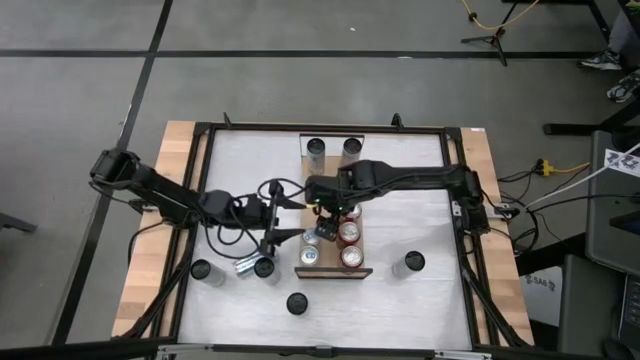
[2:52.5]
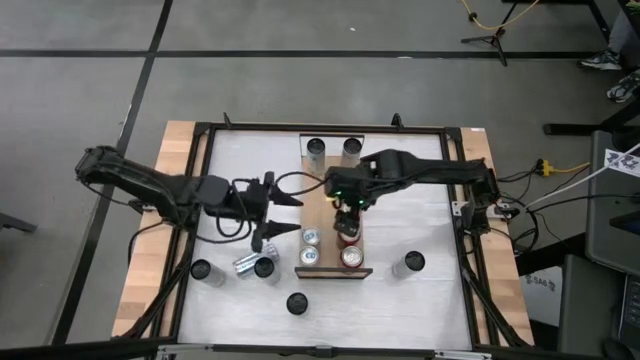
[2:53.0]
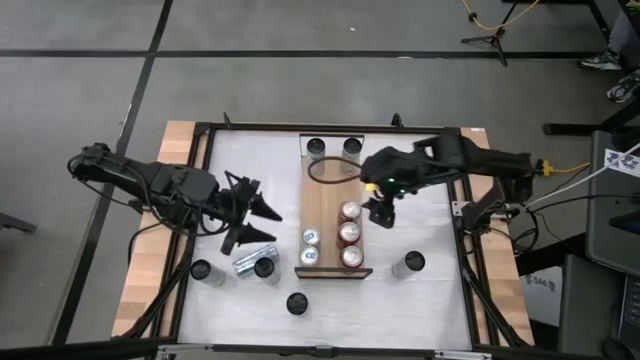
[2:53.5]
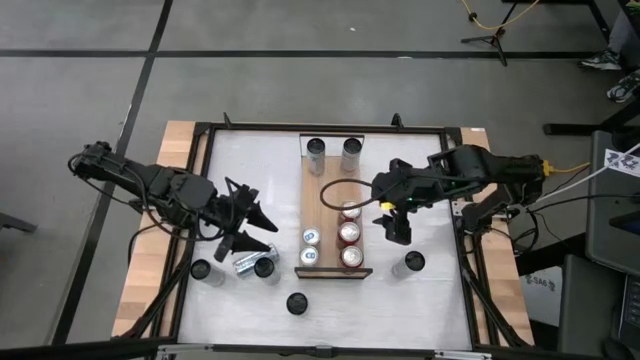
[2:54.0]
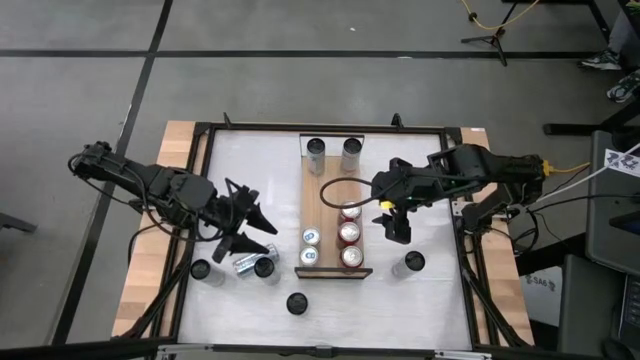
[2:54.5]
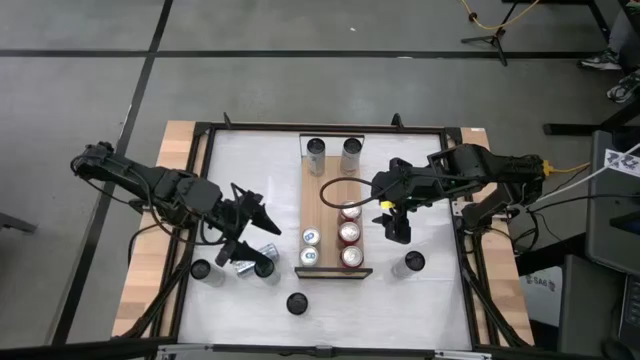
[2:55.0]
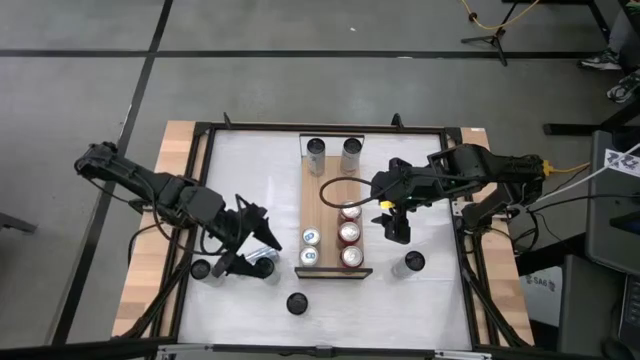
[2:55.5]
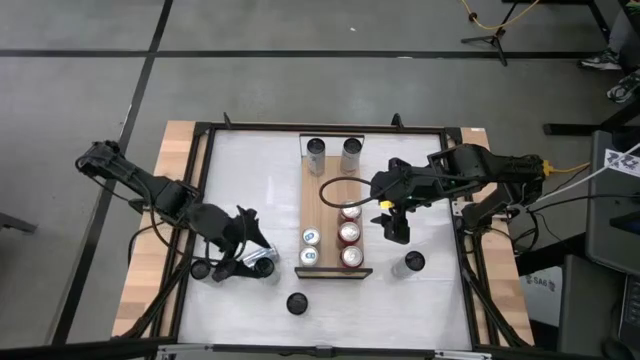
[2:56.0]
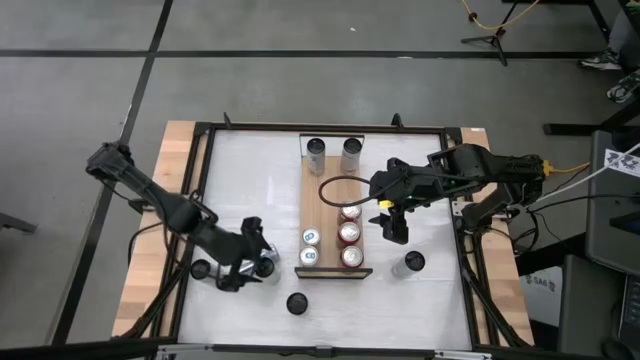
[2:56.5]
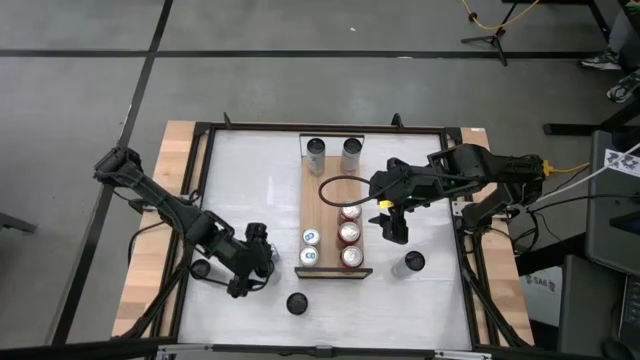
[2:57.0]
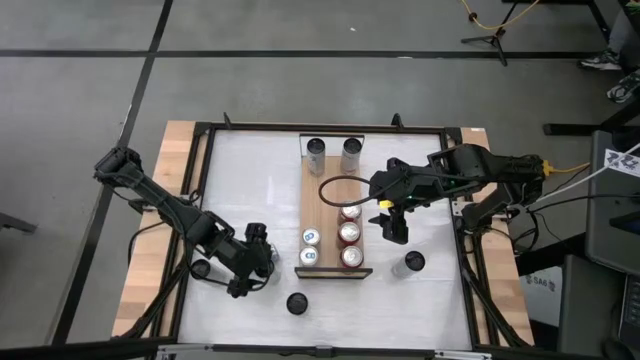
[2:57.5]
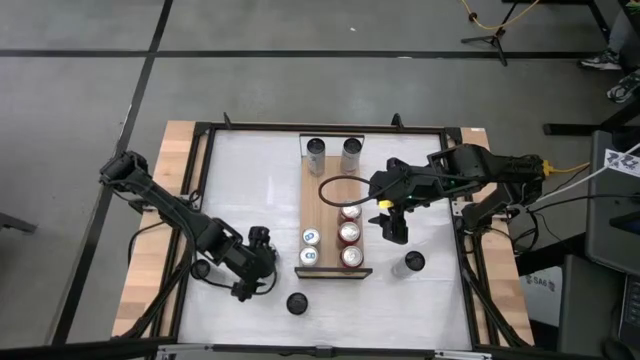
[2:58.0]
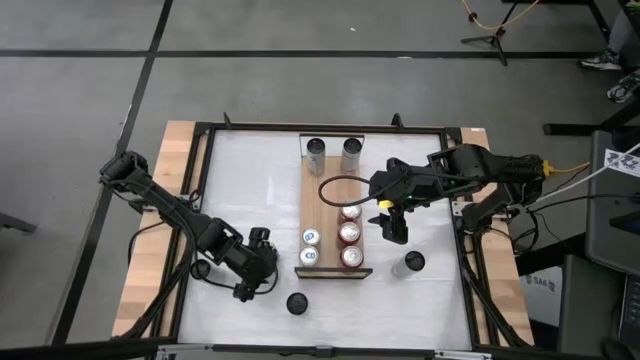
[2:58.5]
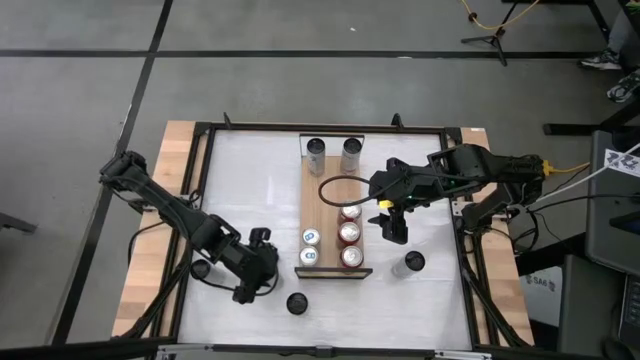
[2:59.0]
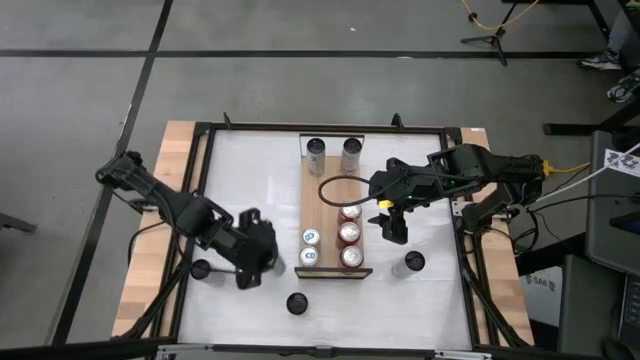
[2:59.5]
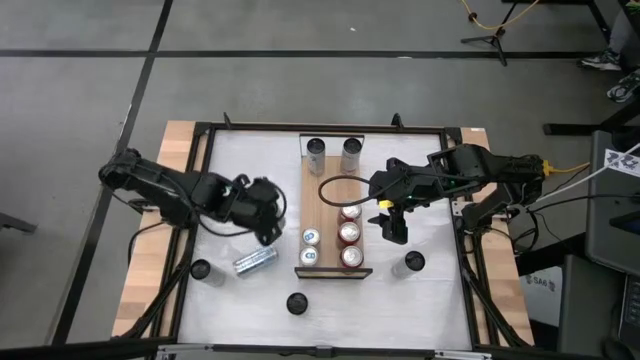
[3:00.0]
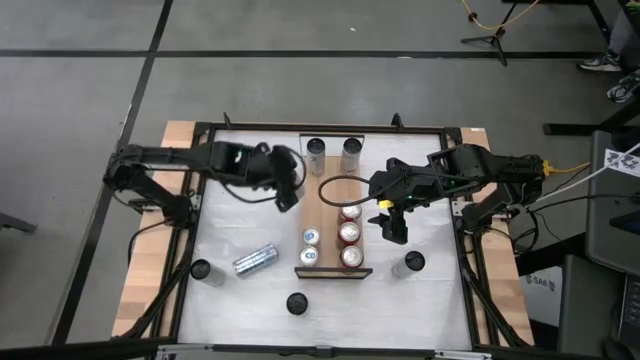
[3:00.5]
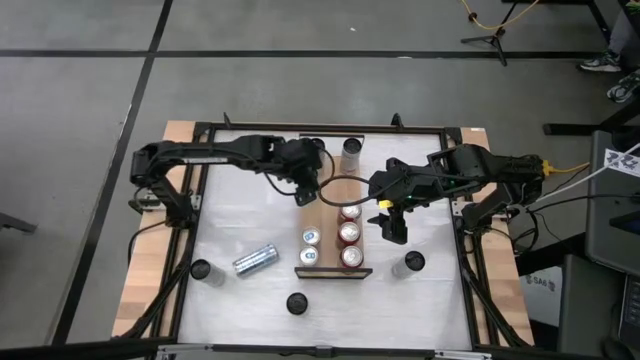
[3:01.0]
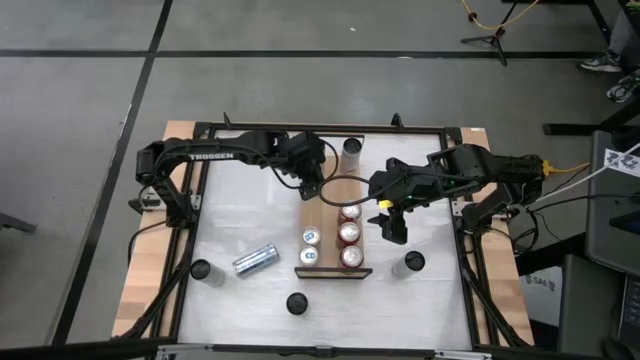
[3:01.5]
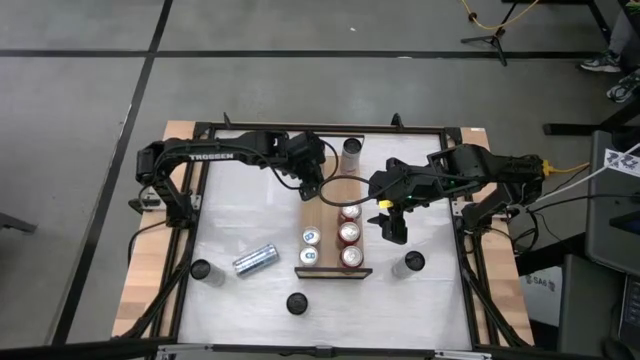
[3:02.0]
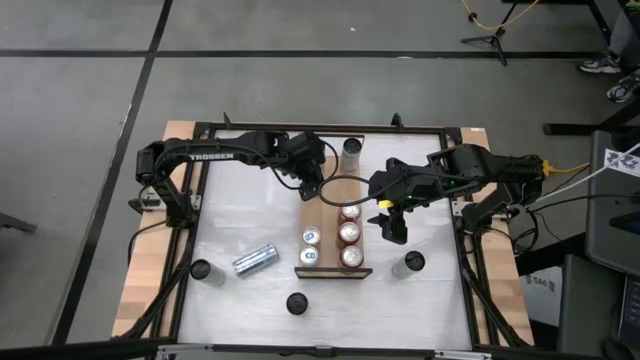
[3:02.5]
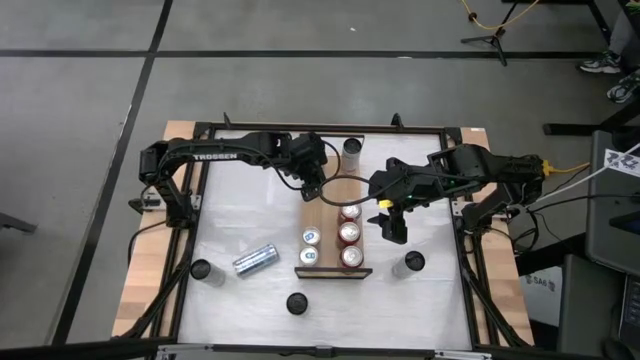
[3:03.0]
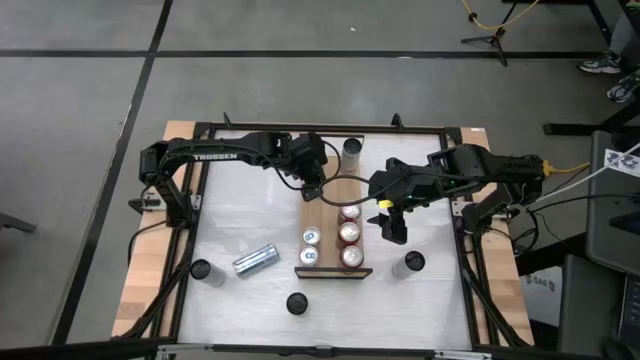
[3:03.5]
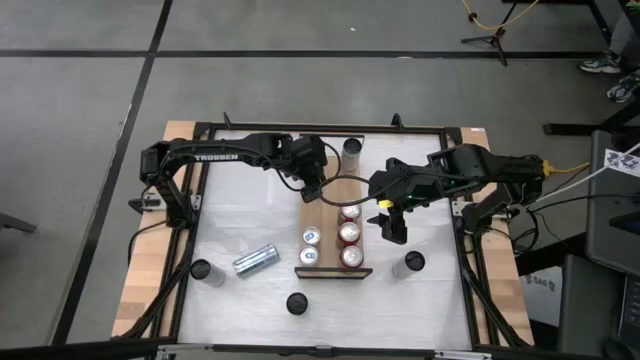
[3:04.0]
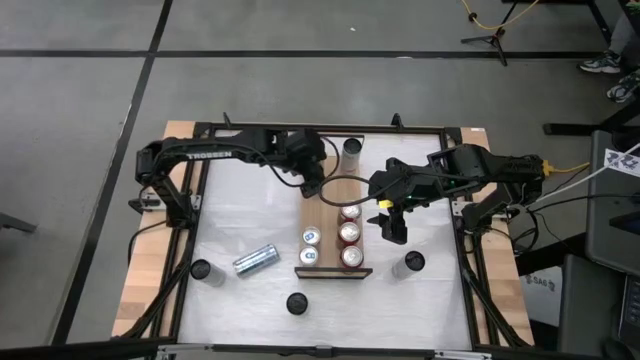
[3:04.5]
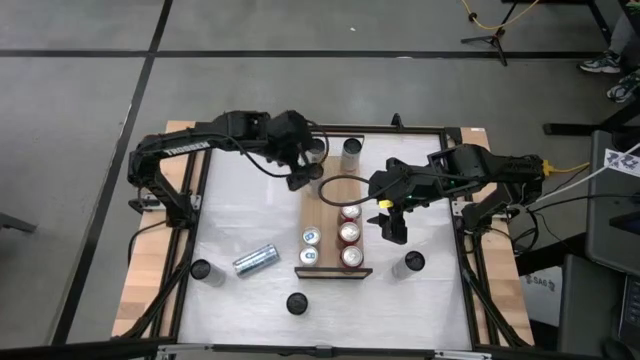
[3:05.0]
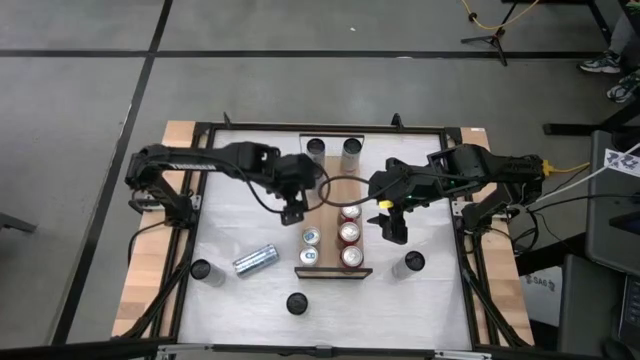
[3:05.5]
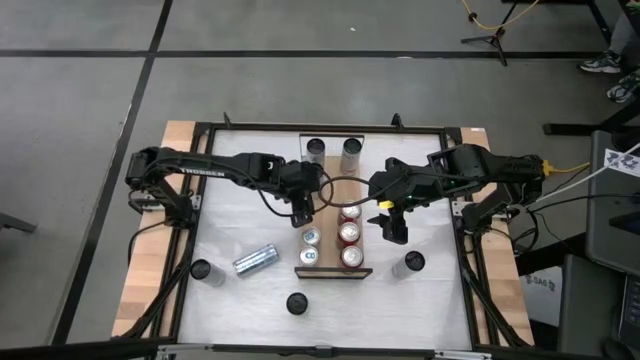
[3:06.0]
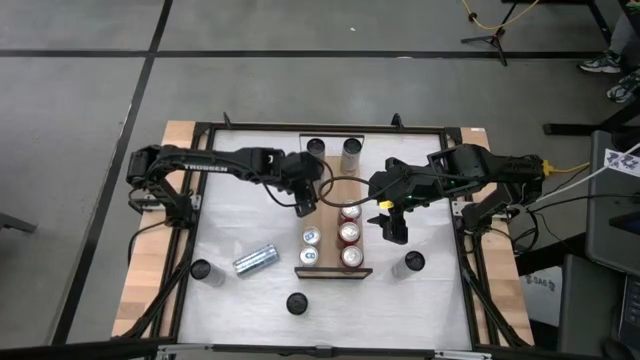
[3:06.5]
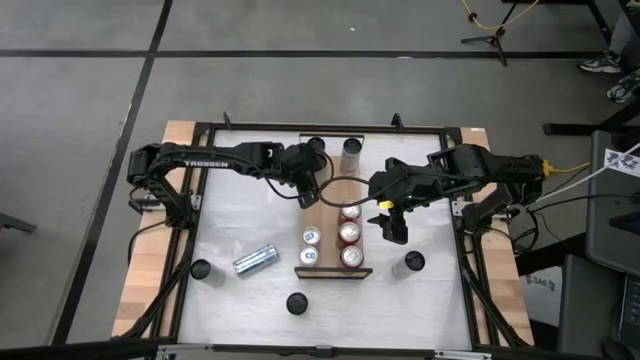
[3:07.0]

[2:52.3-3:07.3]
Task: Place canned beverage on shelf
Put the white pink soda can on the shelf aligned with the other white pink soda can

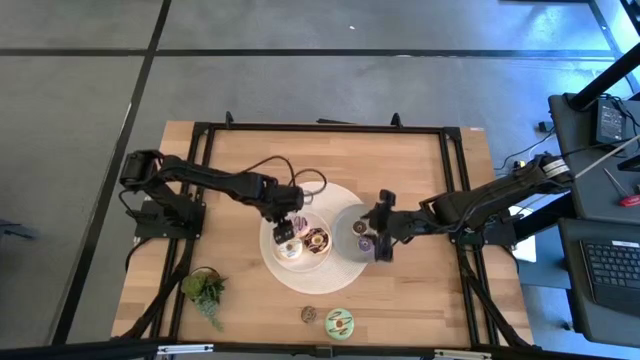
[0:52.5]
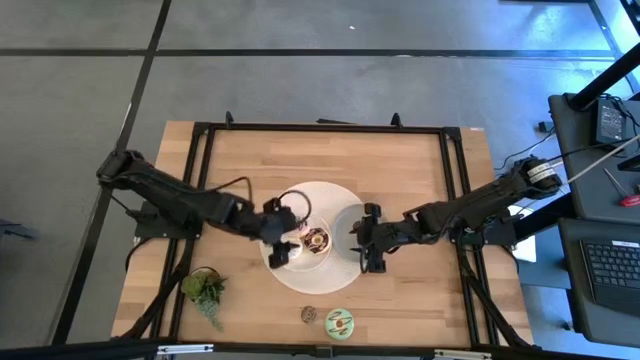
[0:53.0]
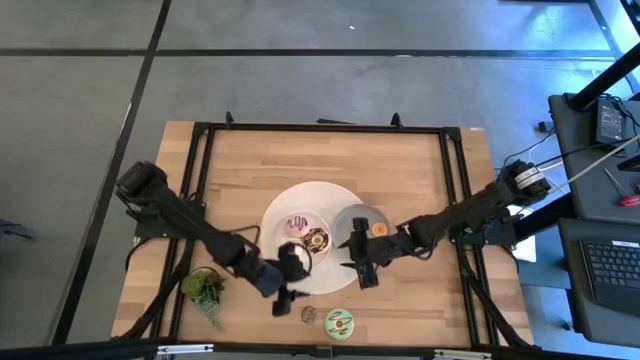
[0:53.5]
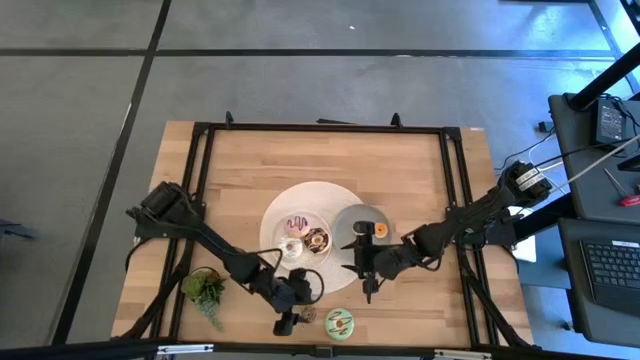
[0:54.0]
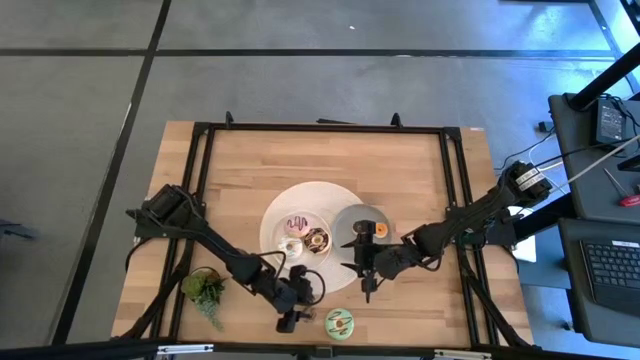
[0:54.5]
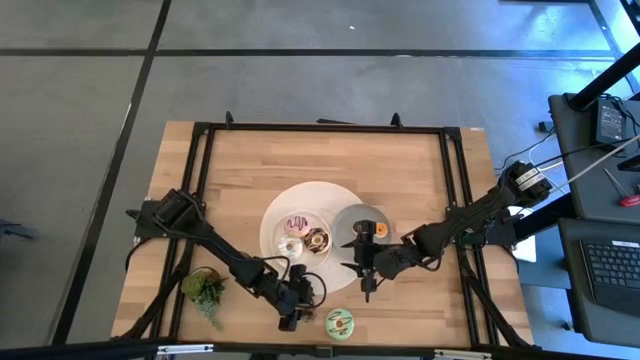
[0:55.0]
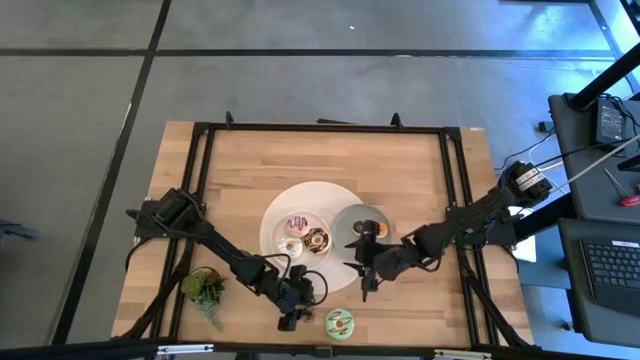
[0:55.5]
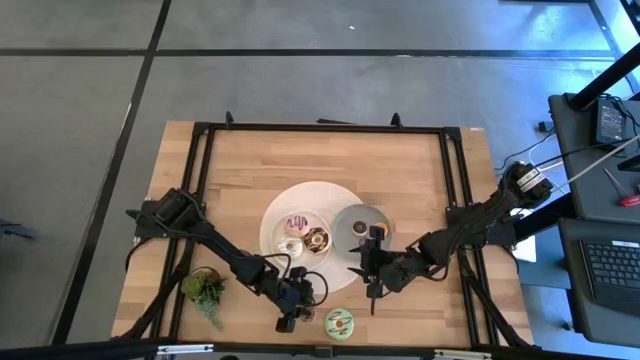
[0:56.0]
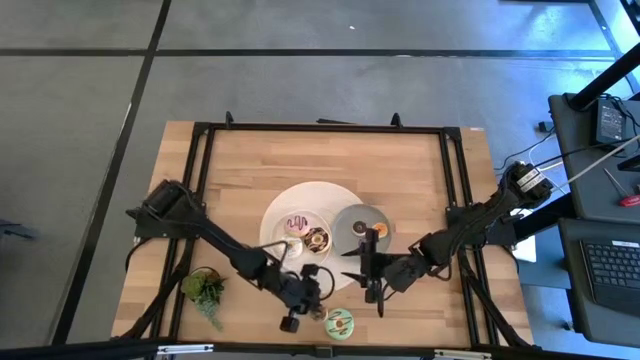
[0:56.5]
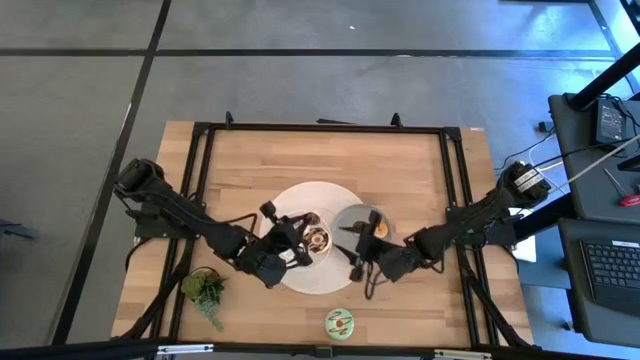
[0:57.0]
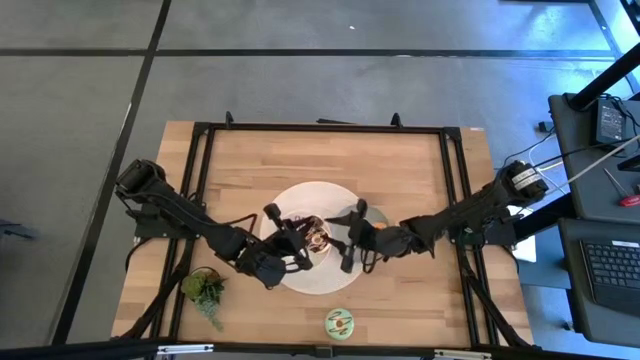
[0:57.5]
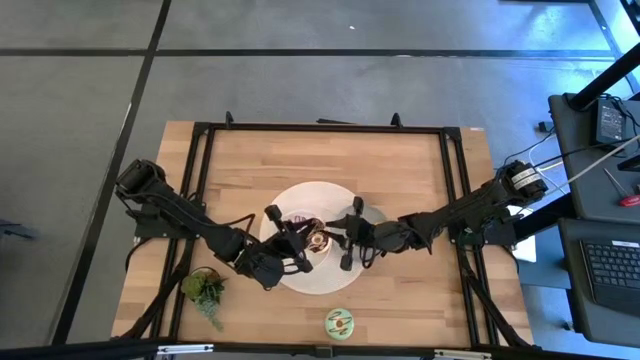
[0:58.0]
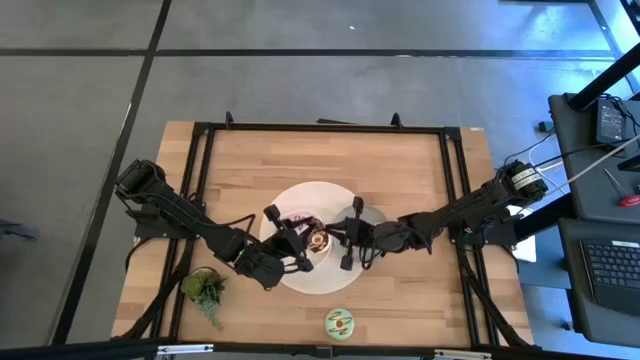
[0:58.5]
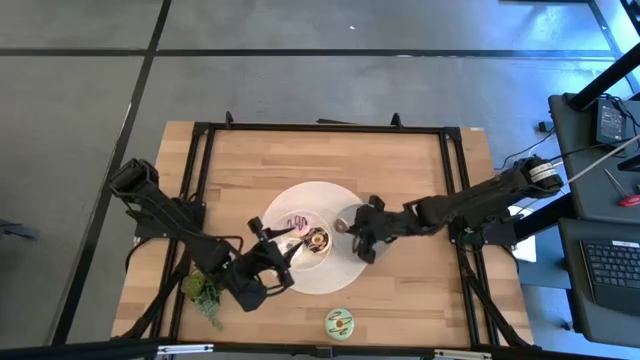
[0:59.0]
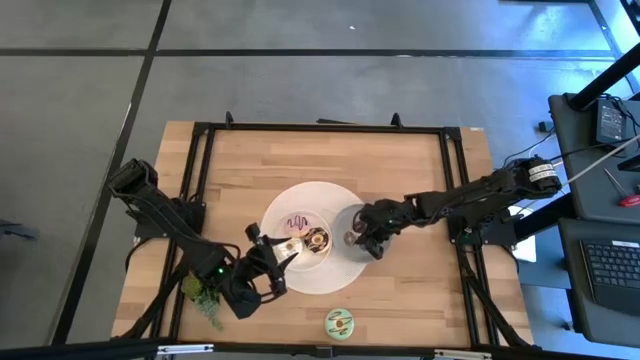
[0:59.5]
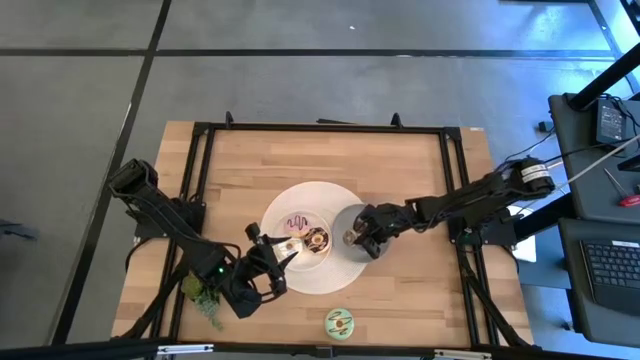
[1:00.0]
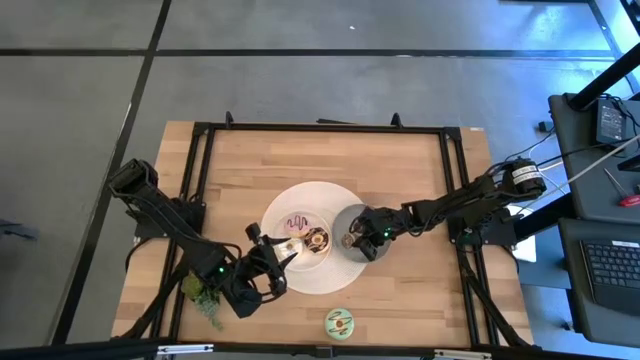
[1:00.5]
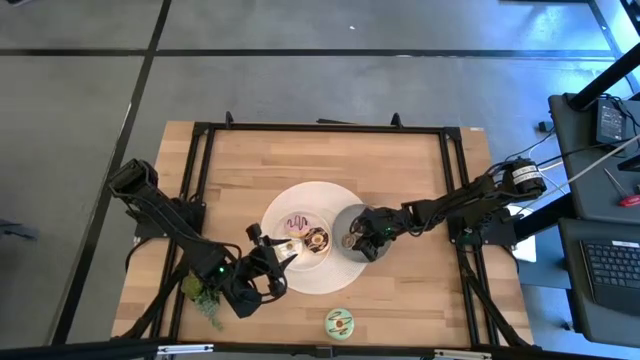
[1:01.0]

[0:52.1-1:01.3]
Task: Pick & Place donuts
Put the small brown donut on the gray plate
